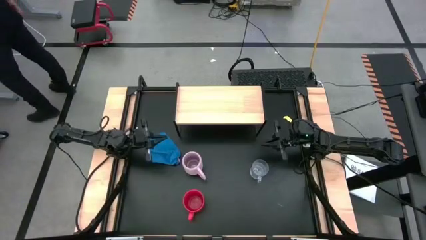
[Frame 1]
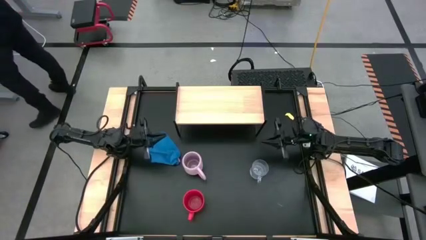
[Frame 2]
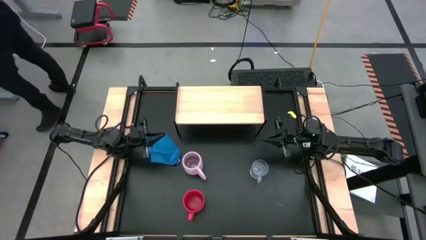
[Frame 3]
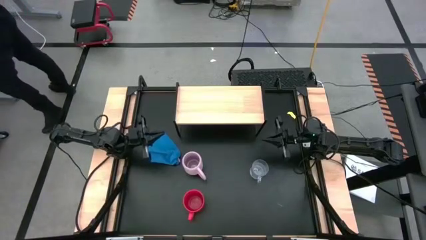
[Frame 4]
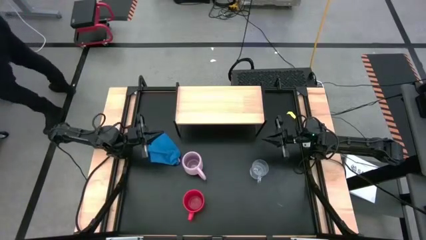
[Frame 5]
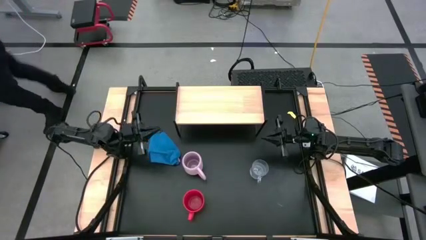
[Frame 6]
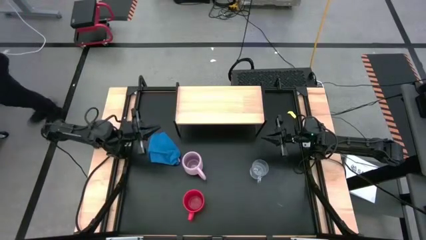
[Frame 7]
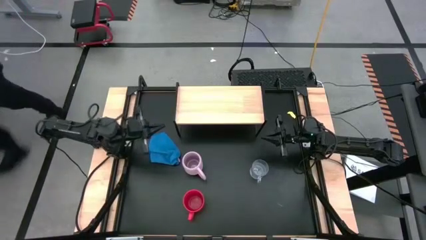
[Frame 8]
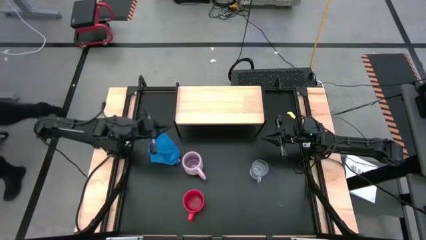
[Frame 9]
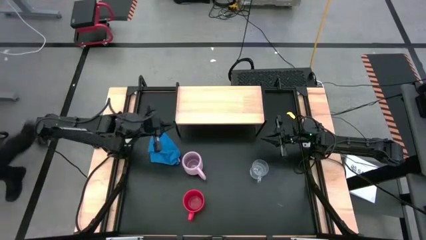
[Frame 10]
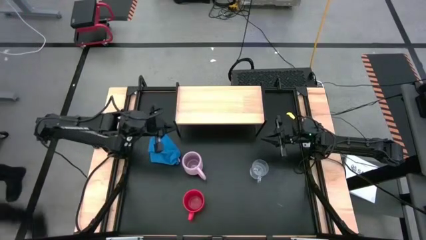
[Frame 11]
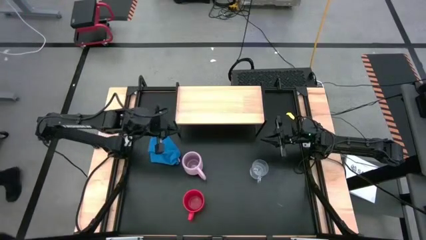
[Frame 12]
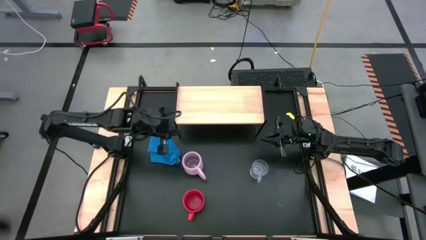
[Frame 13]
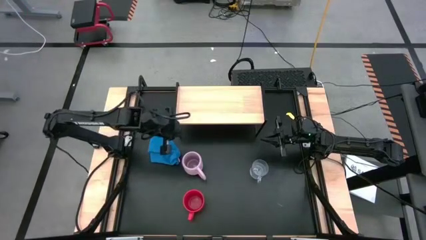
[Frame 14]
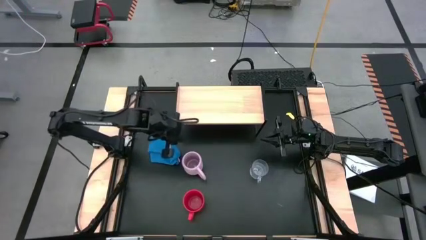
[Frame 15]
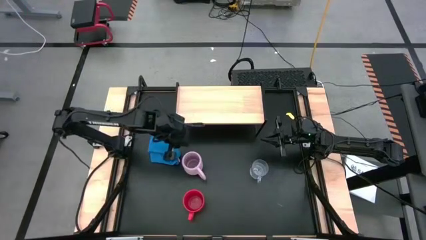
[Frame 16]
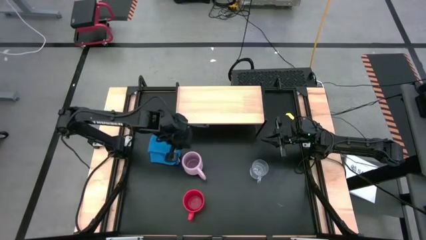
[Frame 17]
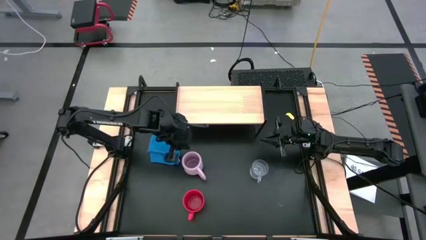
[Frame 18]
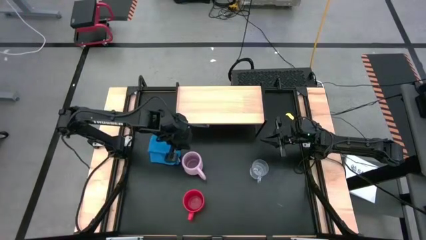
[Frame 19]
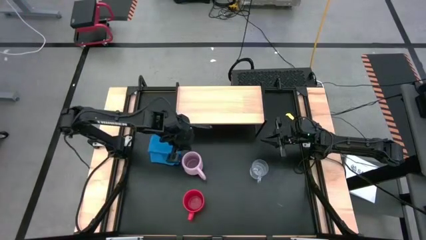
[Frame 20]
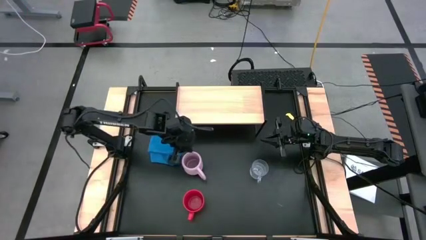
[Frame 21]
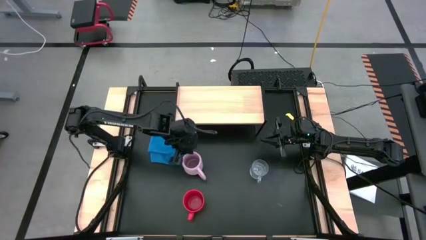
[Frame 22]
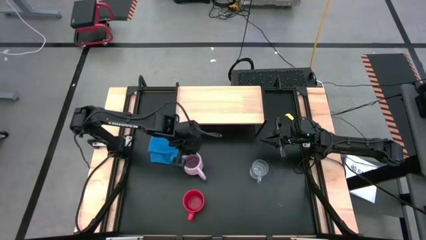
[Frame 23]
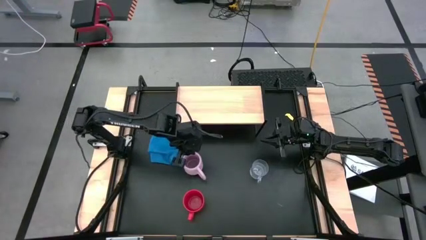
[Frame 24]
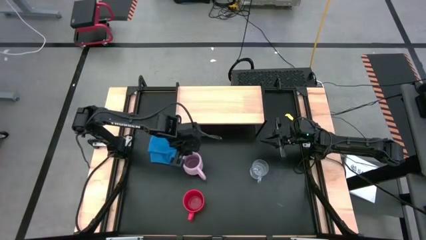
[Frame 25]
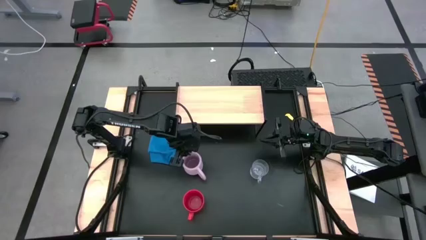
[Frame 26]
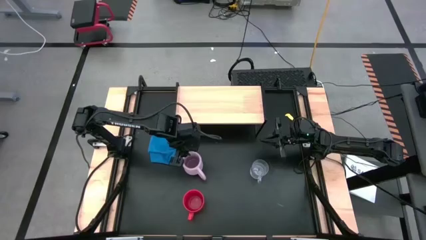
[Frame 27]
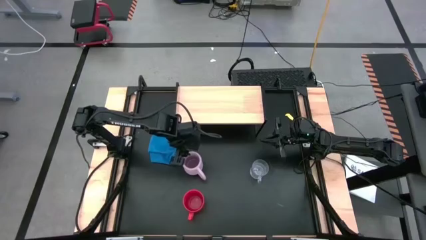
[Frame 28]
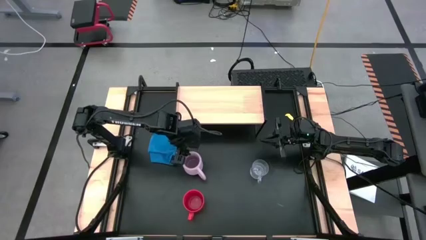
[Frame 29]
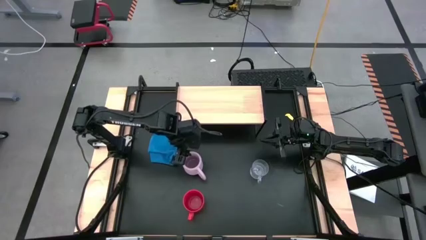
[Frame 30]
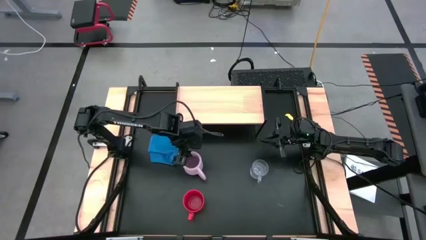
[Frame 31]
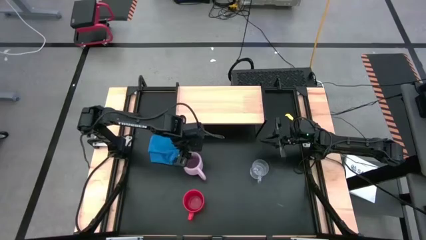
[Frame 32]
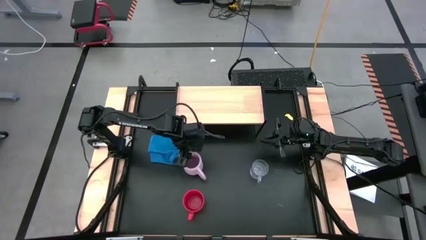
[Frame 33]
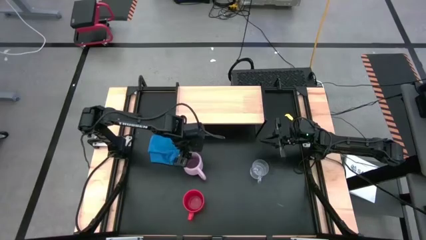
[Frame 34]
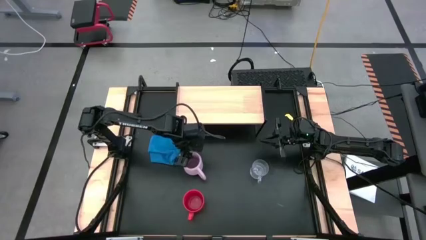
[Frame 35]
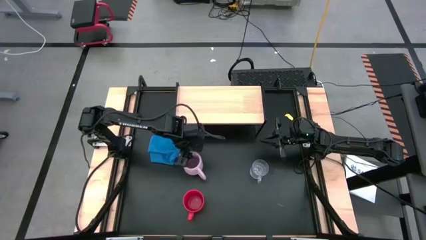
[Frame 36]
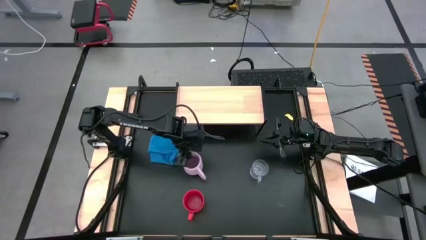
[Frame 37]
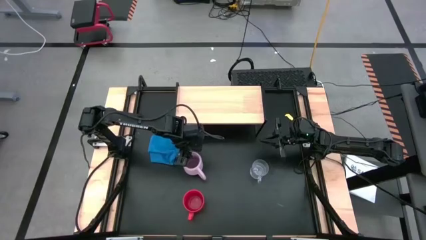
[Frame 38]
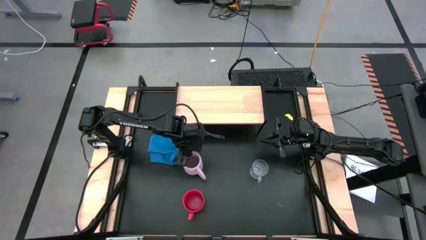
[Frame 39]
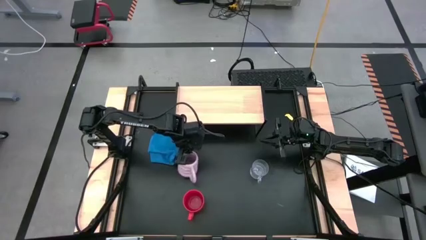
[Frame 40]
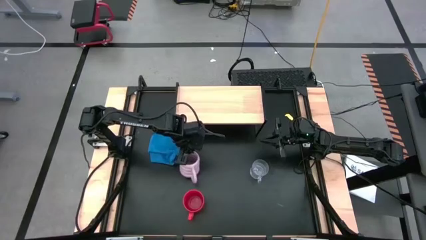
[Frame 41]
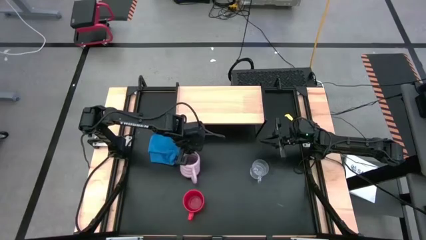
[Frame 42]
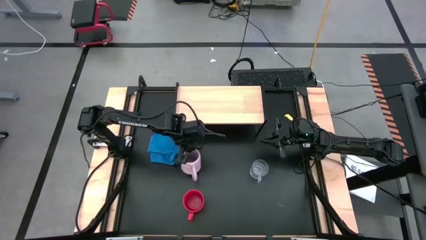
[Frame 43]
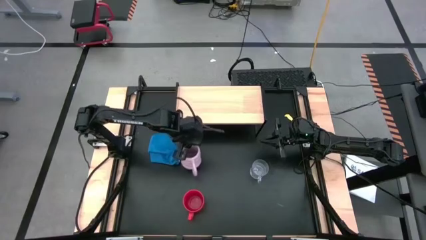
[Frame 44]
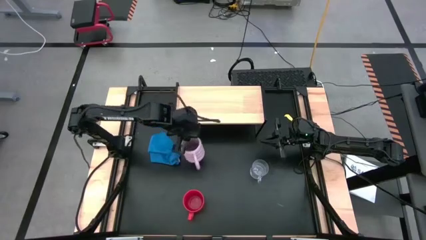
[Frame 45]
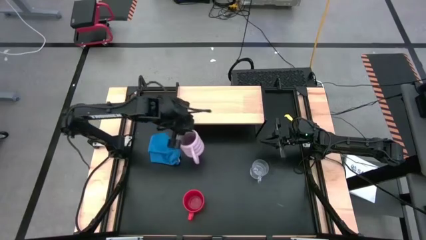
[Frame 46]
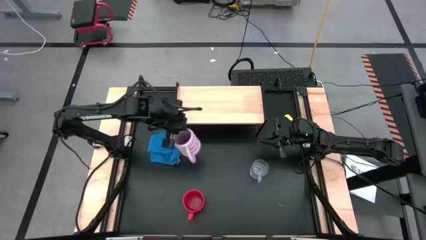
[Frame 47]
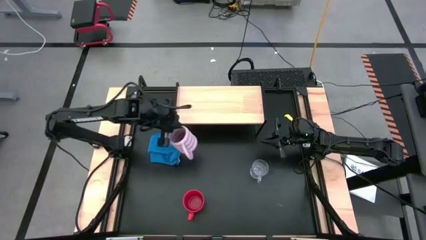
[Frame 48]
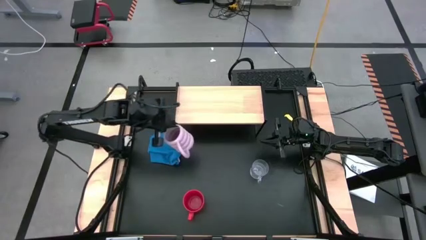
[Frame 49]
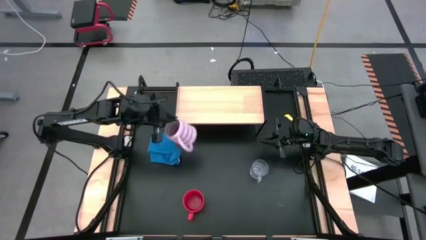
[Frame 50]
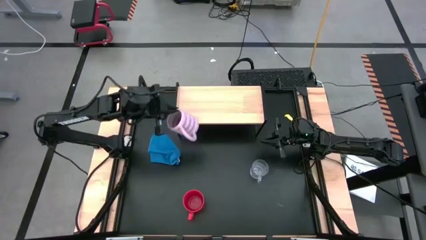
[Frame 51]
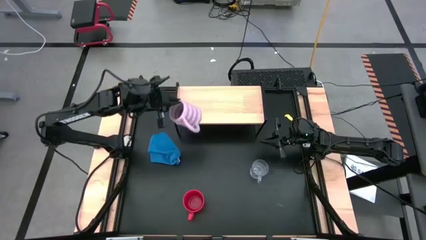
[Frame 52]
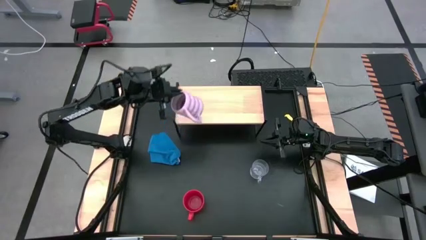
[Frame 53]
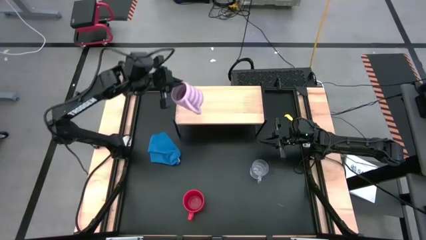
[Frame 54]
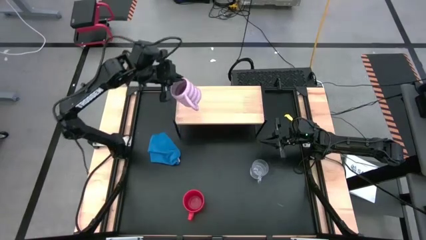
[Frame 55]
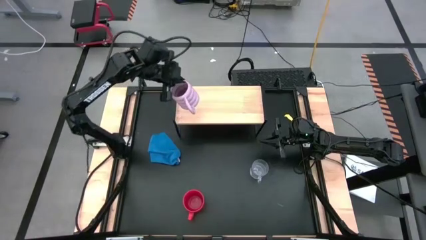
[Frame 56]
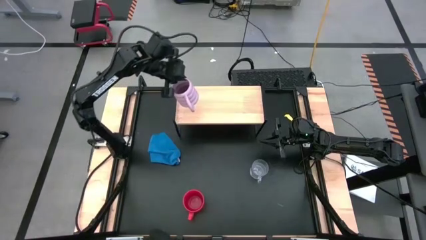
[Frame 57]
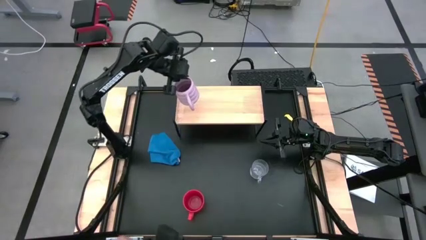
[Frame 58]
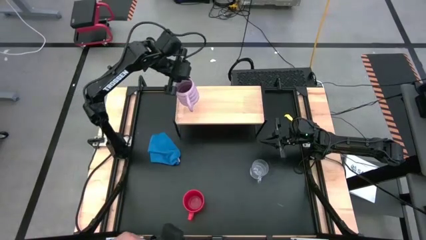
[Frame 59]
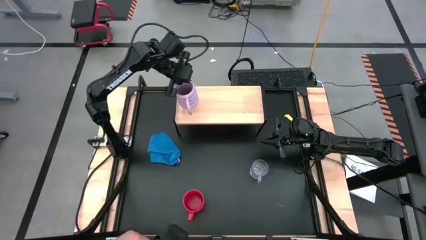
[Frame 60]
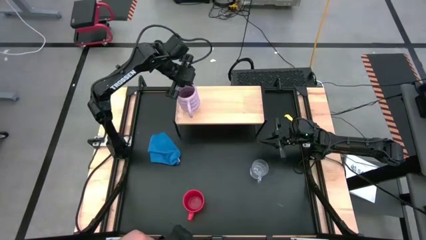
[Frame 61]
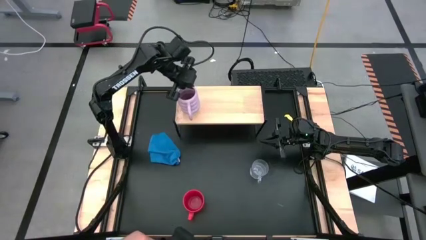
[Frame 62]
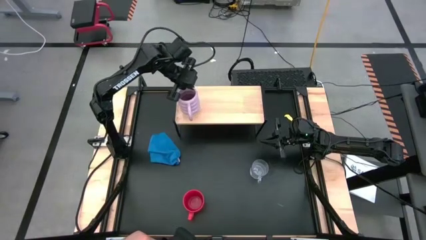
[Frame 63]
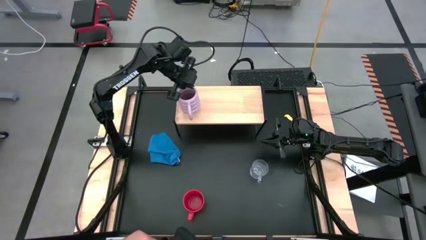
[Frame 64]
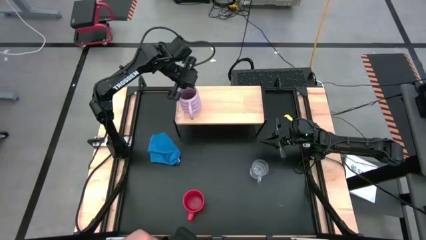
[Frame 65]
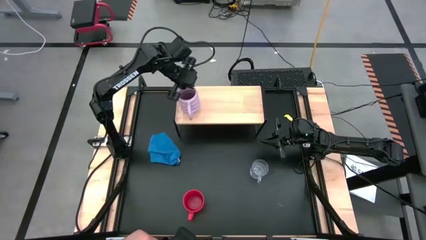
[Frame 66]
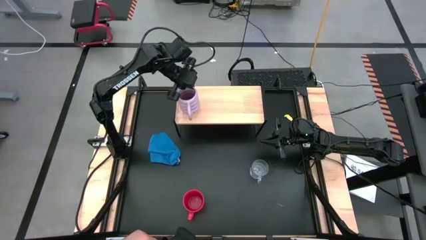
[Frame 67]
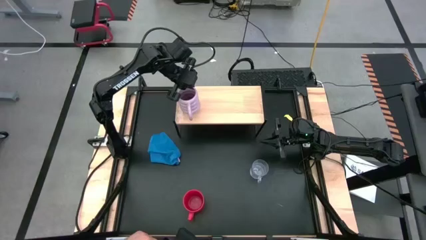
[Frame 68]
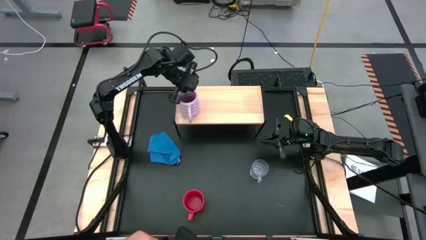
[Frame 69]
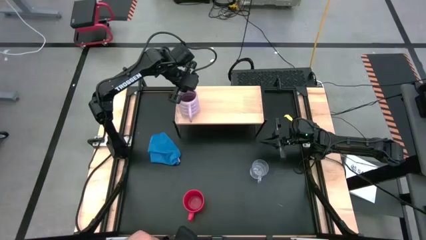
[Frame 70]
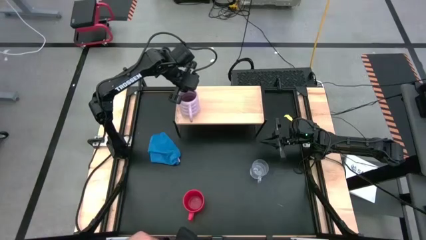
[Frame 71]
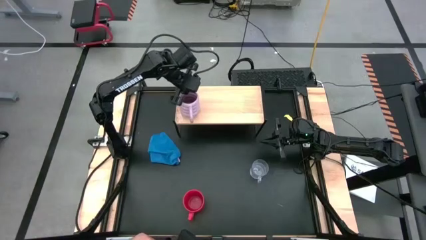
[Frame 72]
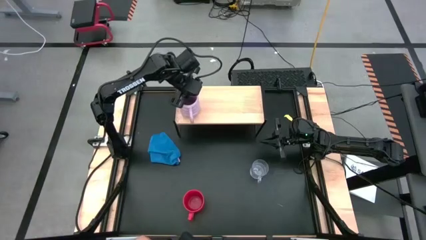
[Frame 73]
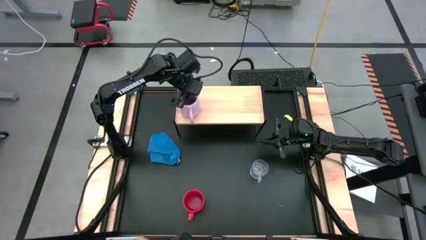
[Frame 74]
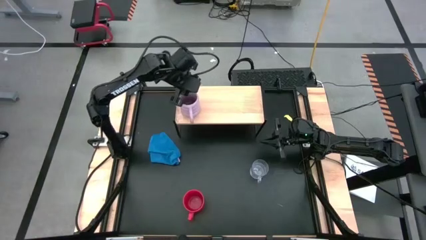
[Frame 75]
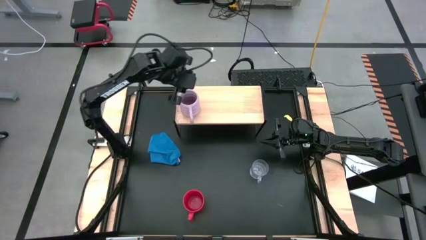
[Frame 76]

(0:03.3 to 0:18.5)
Task: Stack small to large cups/mugs on shelf
Put the violet mug on the shelf
